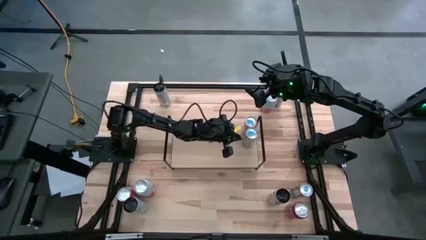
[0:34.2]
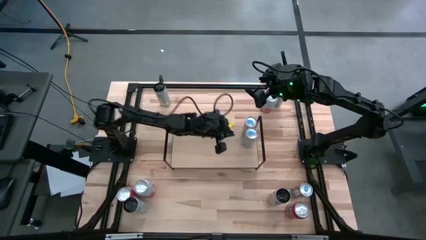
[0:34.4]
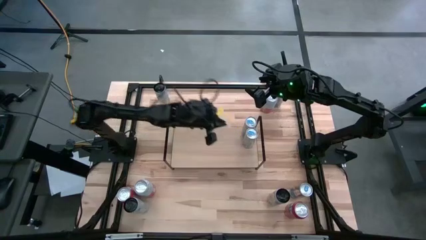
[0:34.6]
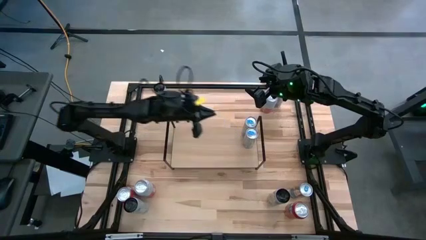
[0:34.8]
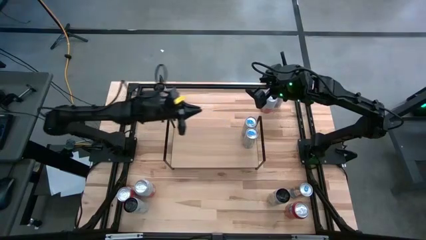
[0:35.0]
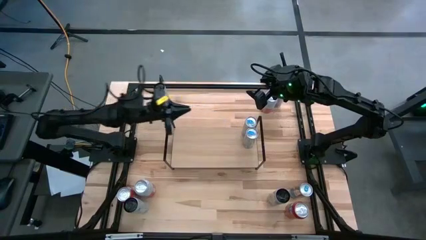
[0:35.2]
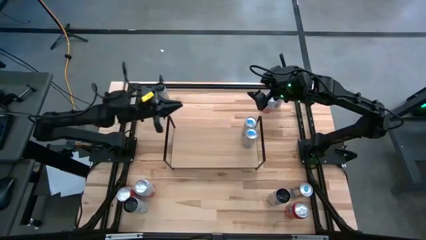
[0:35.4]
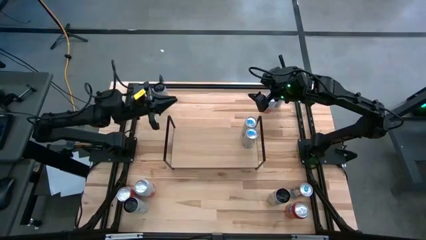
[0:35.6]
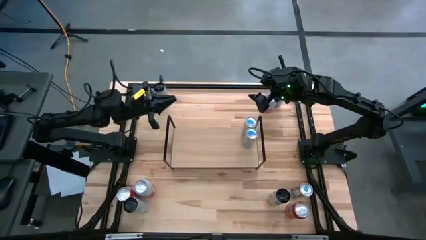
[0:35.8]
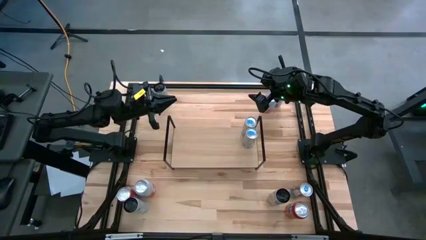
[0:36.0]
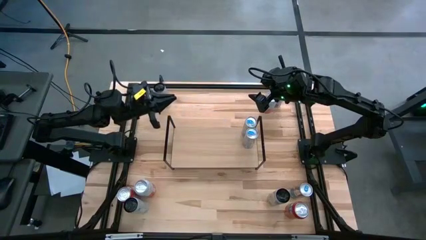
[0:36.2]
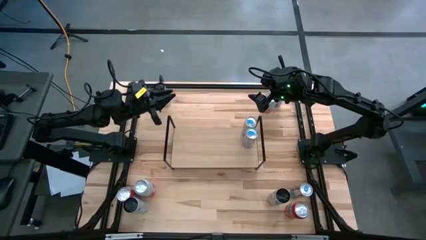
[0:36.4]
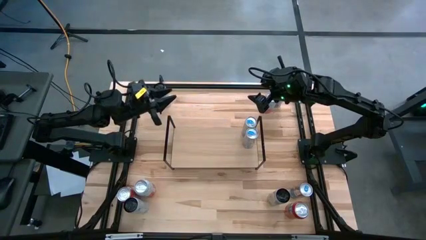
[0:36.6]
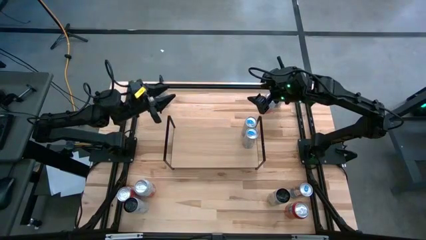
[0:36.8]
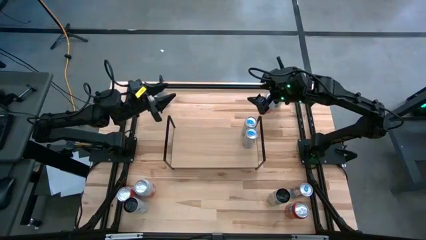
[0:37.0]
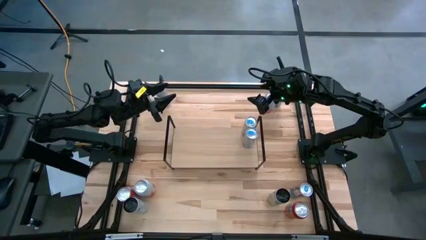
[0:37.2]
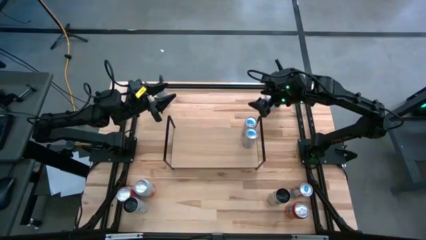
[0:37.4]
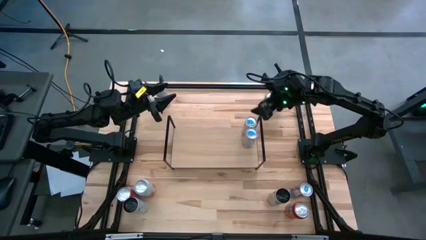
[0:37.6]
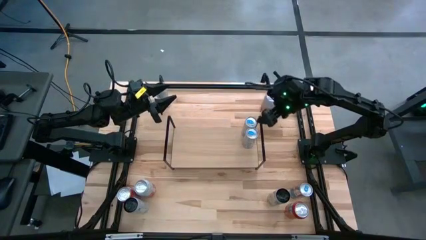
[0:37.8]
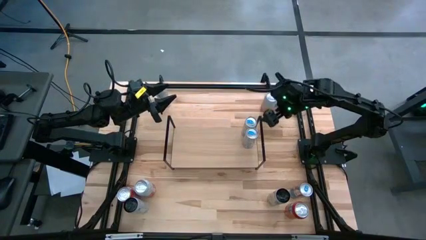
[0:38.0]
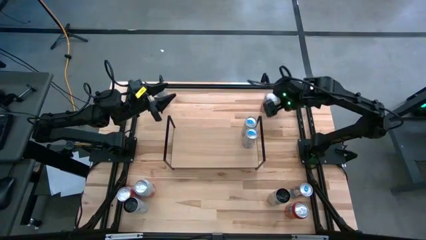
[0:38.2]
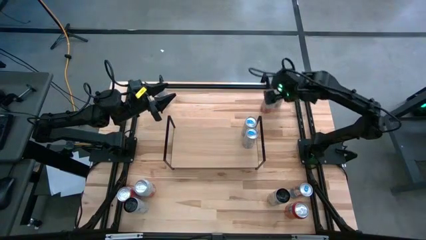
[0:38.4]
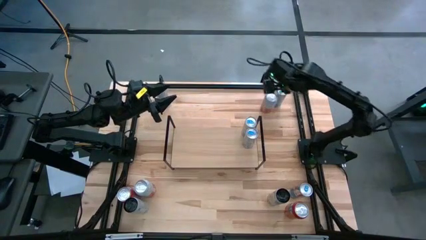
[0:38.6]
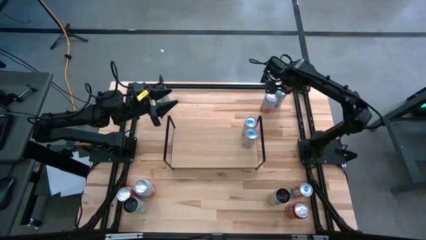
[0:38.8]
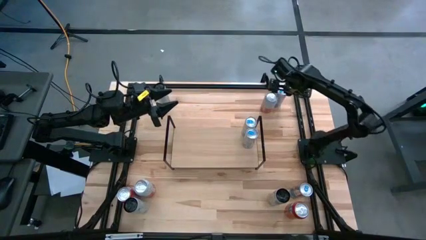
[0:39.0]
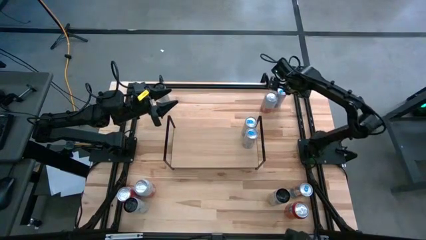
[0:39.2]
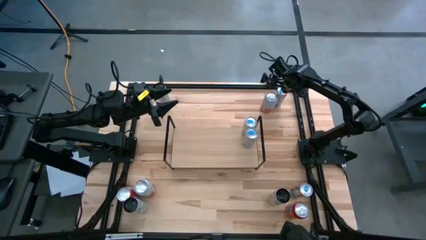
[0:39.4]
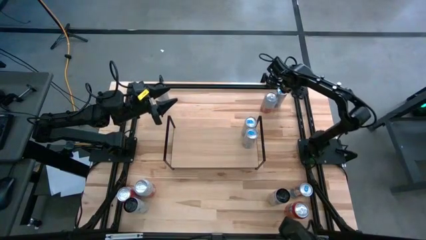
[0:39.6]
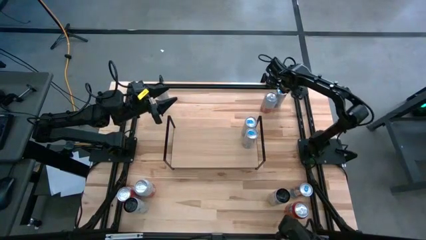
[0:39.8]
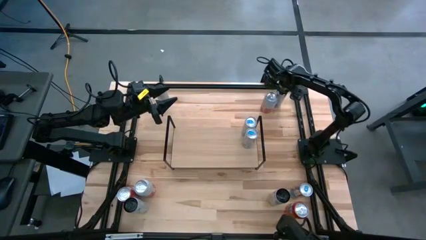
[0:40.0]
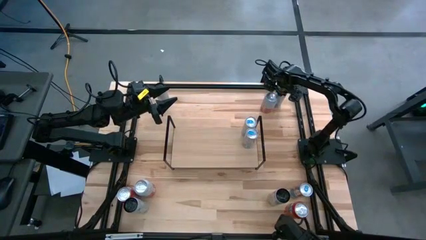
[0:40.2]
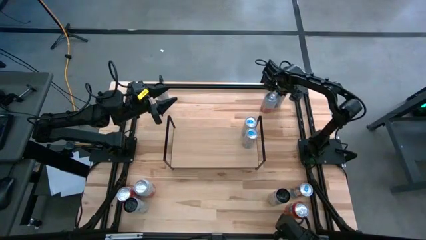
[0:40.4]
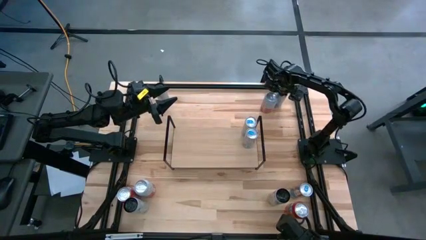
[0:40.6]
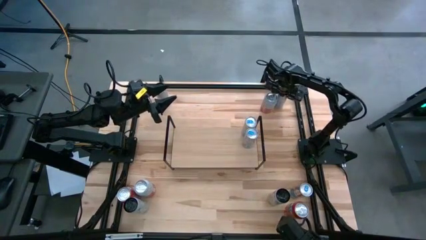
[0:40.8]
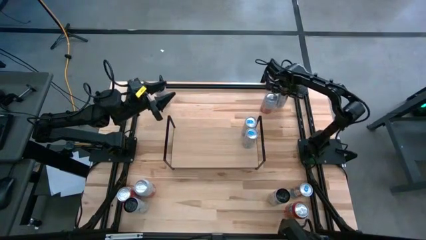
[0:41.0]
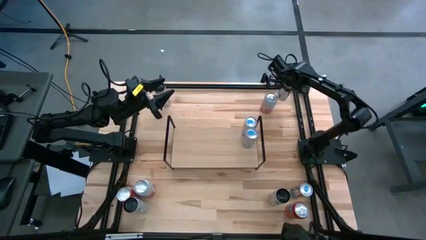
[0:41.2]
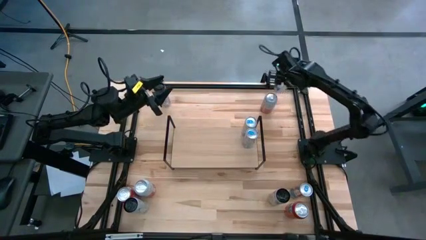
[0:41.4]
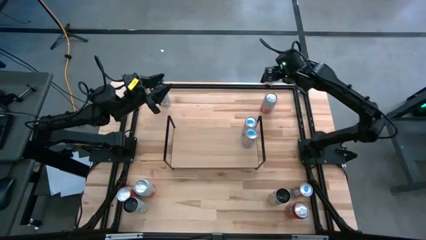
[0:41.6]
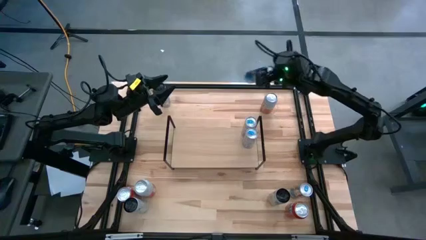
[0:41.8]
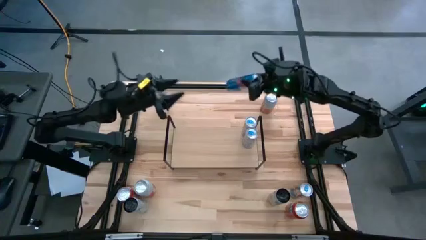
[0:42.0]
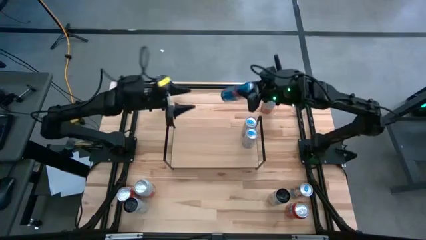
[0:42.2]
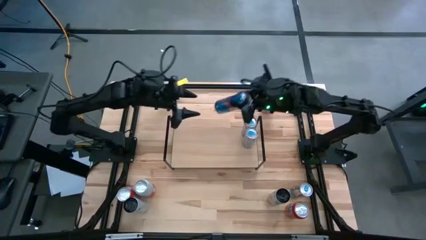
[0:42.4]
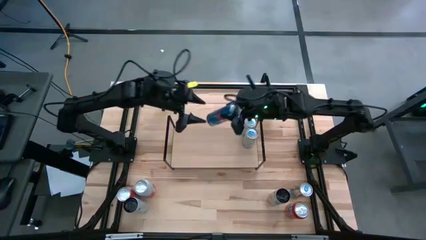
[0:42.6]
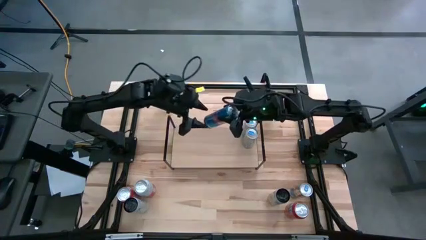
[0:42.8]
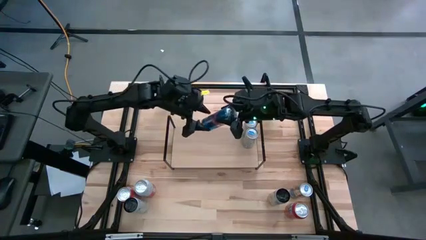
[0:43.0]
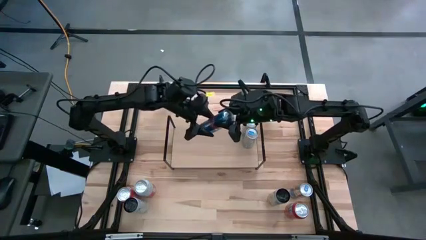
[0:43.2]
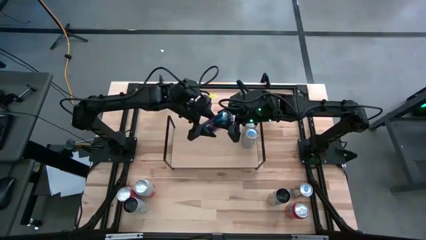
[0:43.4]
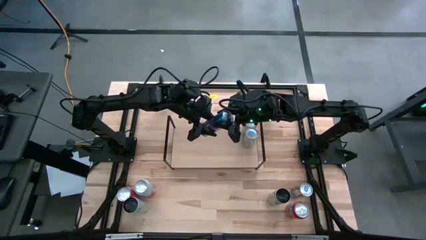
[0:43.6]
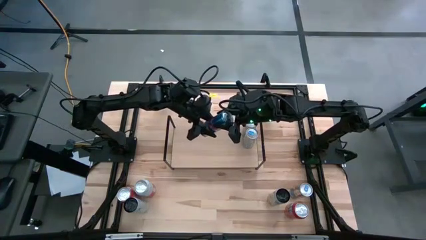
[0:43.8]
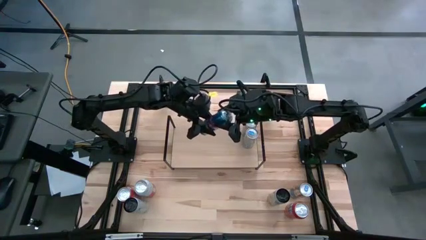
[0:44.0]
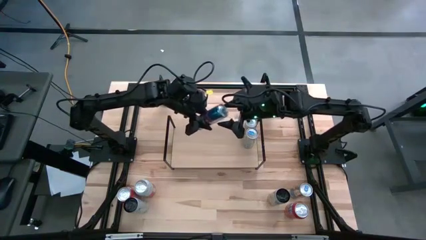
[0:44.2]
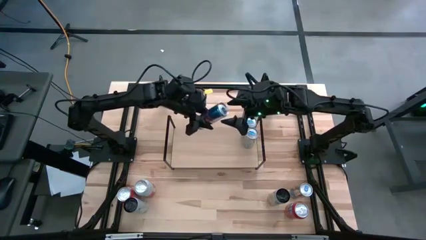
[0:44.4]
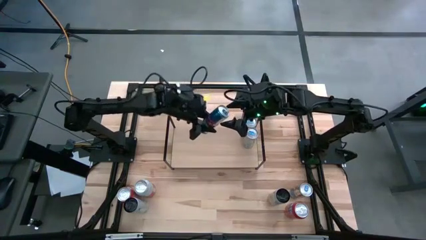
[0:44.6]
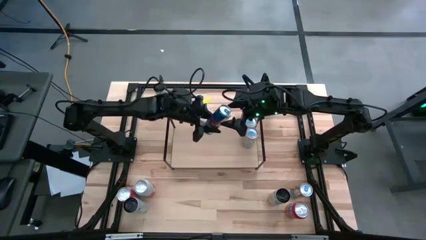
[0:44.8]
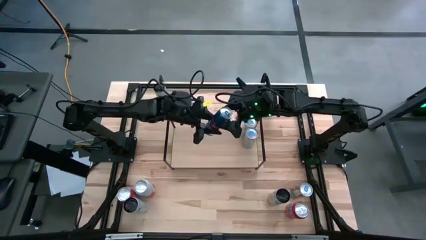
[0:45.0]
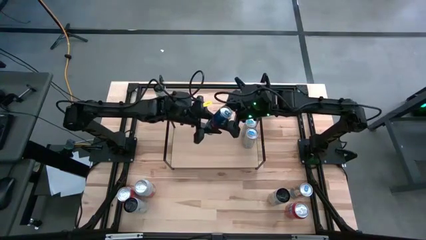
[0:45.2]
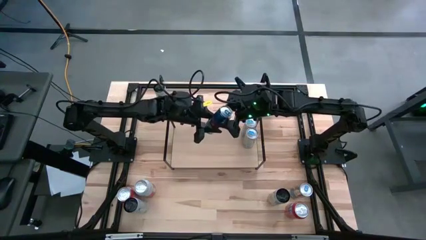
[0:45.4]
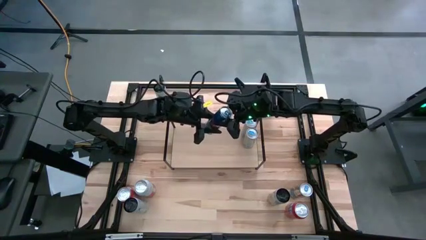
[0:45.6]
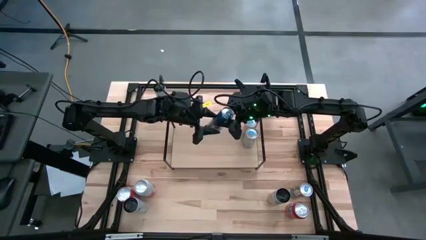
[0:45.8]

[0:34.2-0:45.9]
Task: Place canned beverage on shelf
Put the blue soda can aligned with the other blue soda can on the shelf
